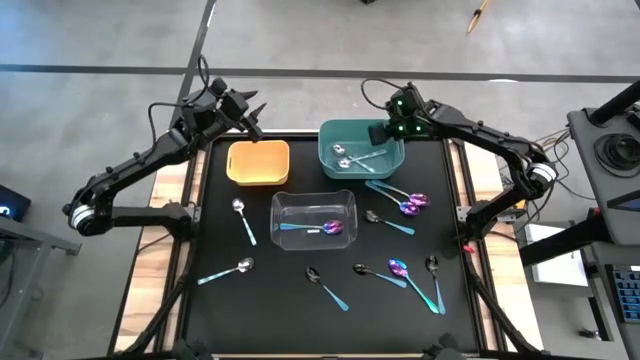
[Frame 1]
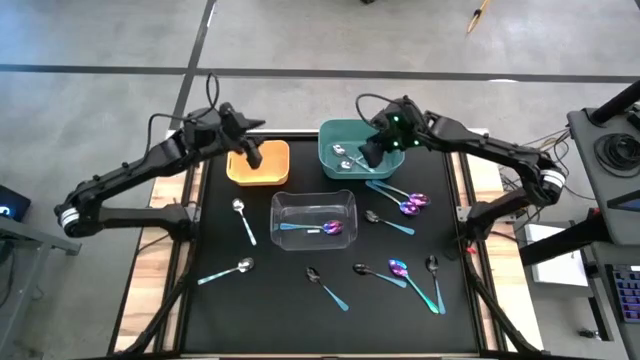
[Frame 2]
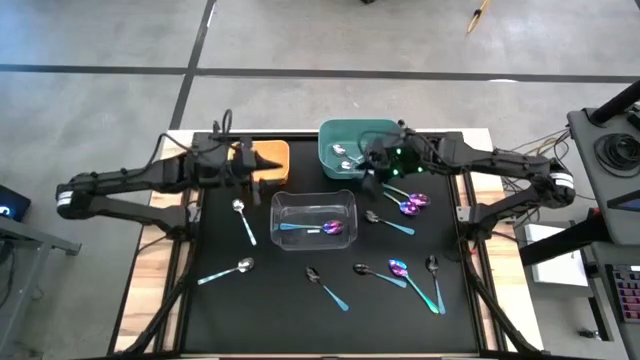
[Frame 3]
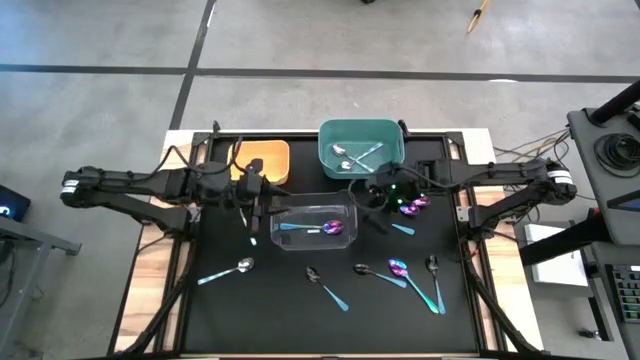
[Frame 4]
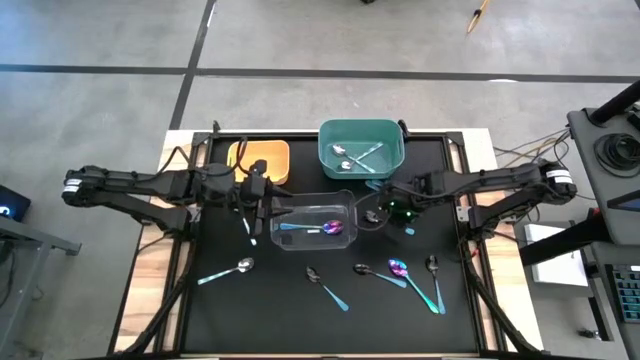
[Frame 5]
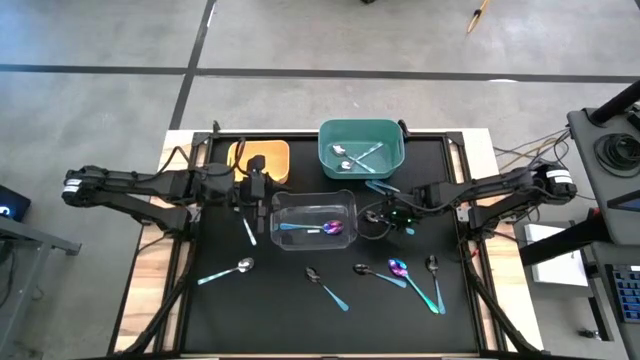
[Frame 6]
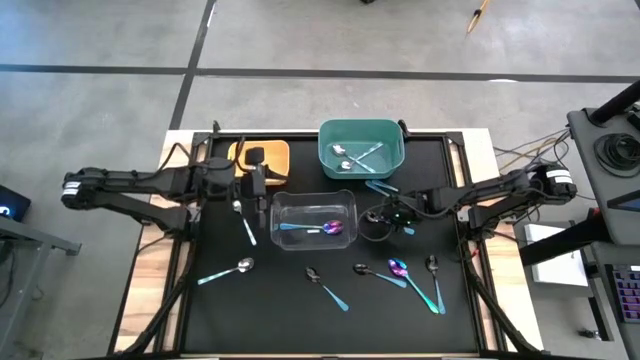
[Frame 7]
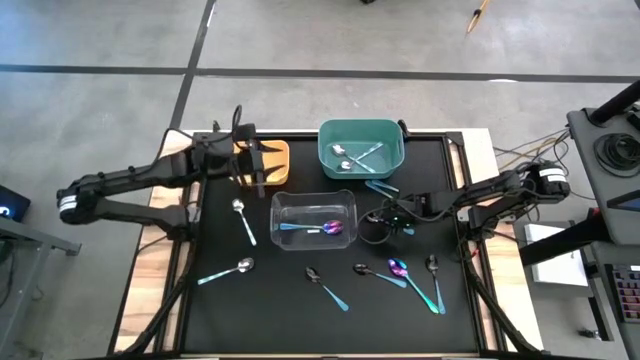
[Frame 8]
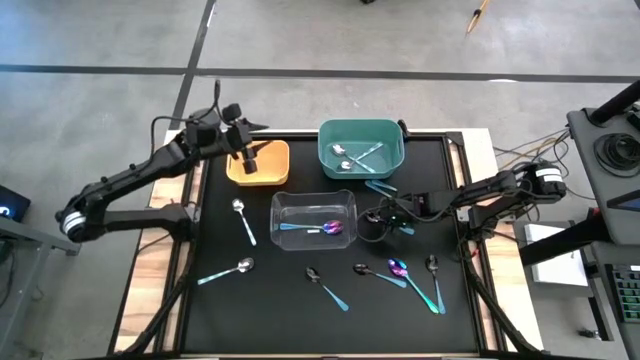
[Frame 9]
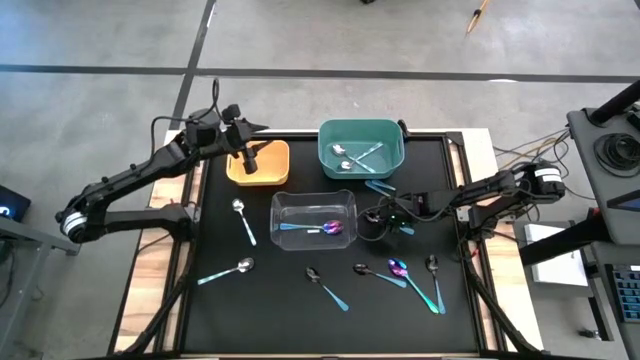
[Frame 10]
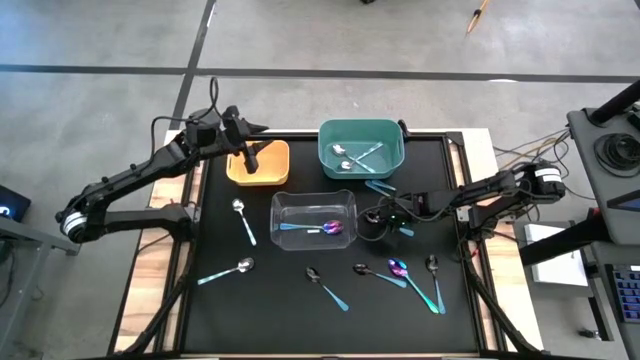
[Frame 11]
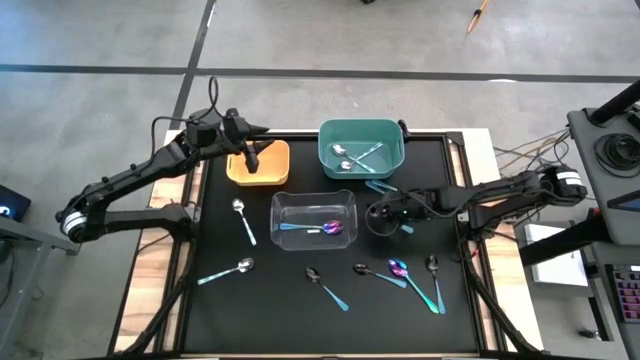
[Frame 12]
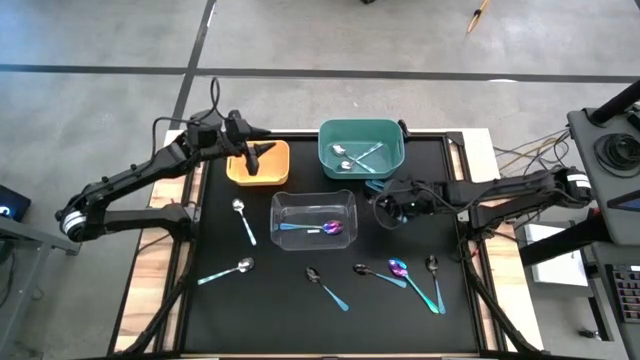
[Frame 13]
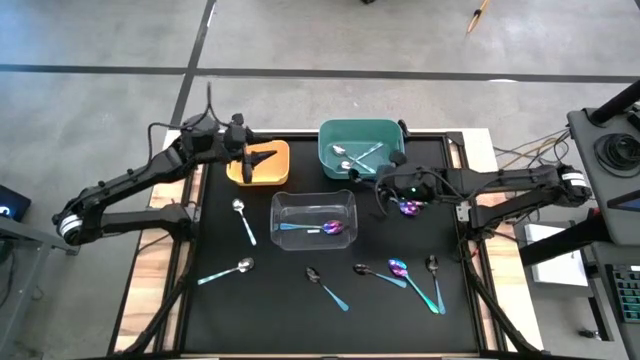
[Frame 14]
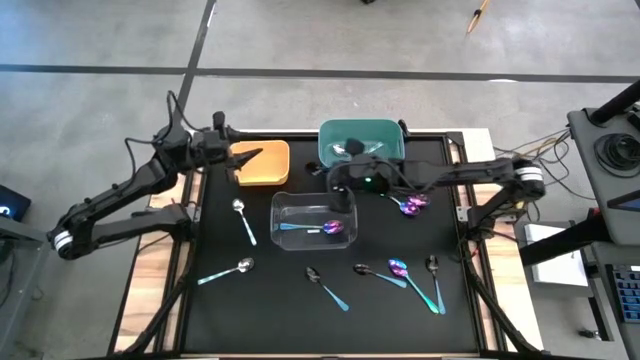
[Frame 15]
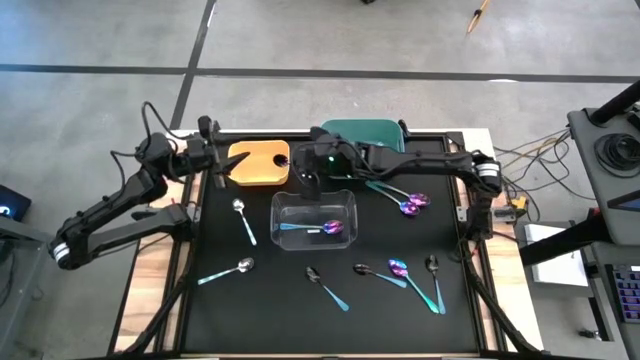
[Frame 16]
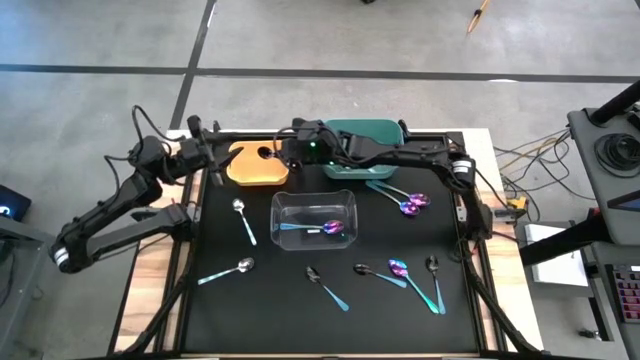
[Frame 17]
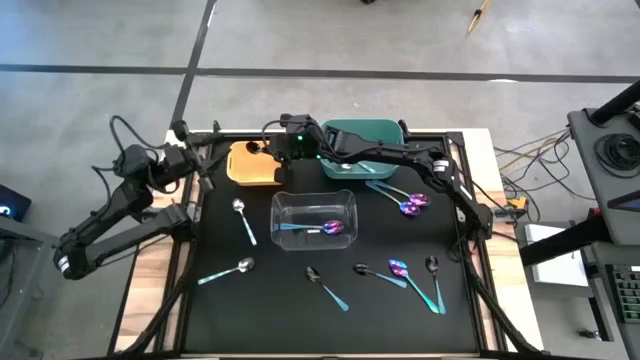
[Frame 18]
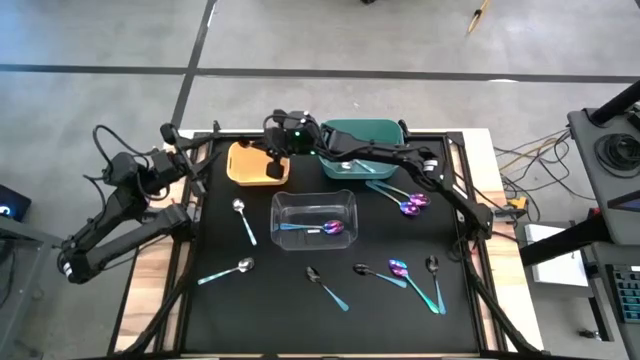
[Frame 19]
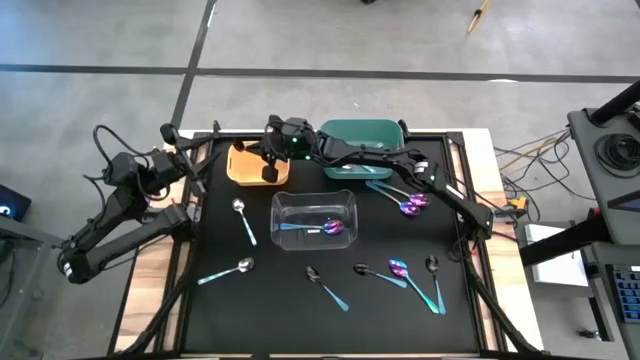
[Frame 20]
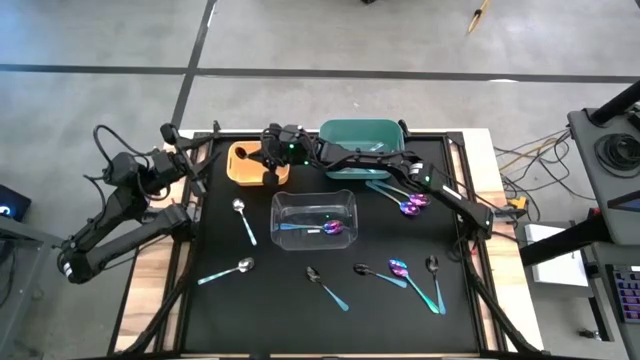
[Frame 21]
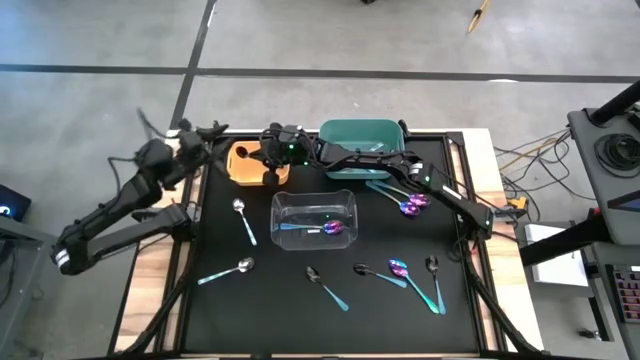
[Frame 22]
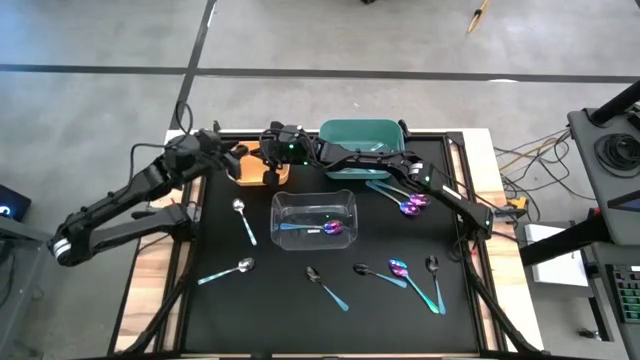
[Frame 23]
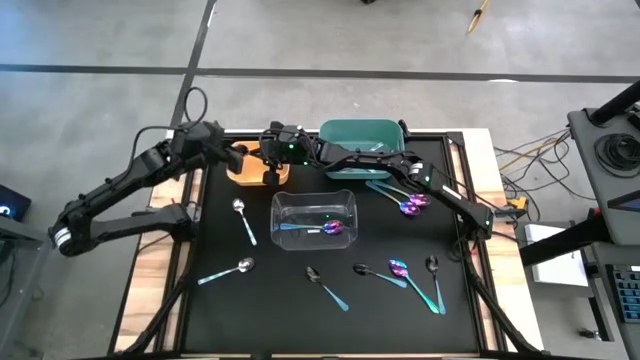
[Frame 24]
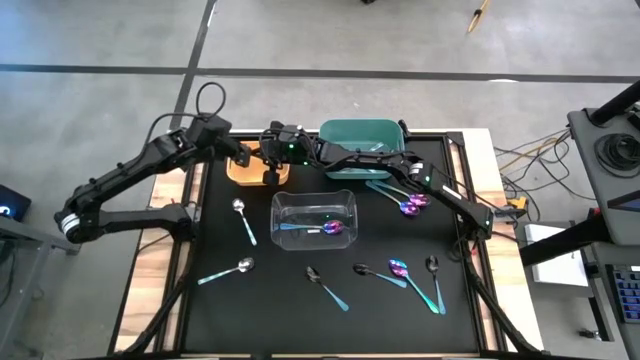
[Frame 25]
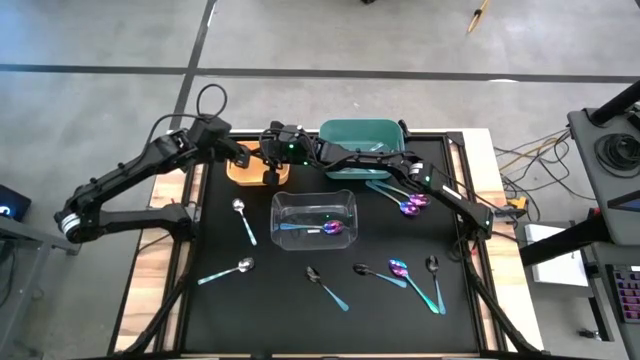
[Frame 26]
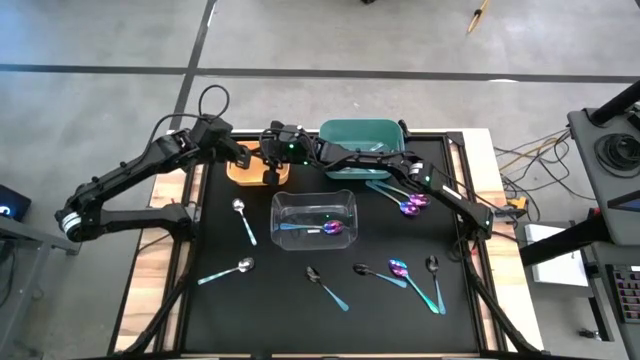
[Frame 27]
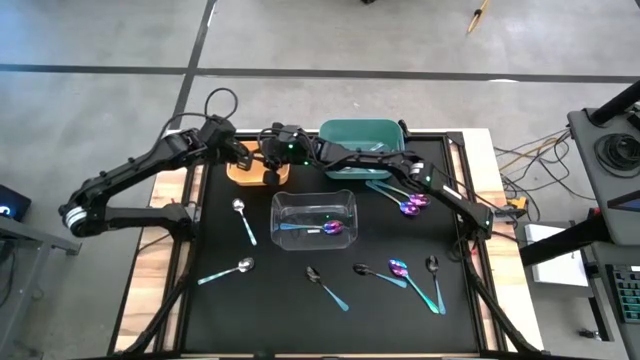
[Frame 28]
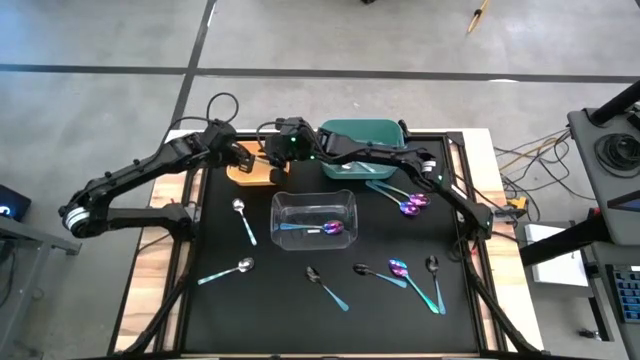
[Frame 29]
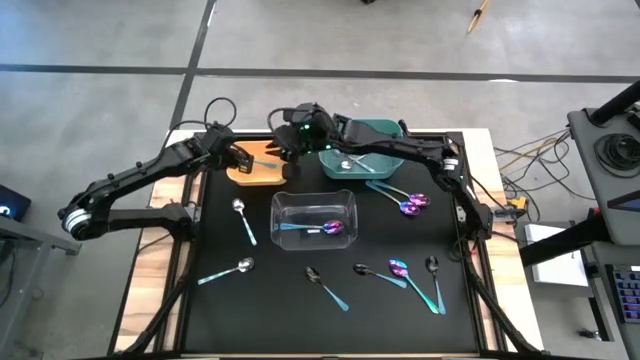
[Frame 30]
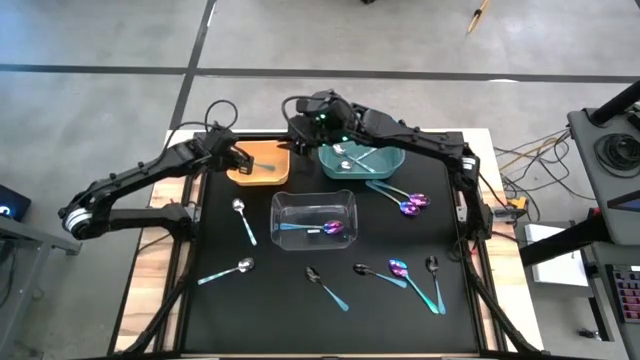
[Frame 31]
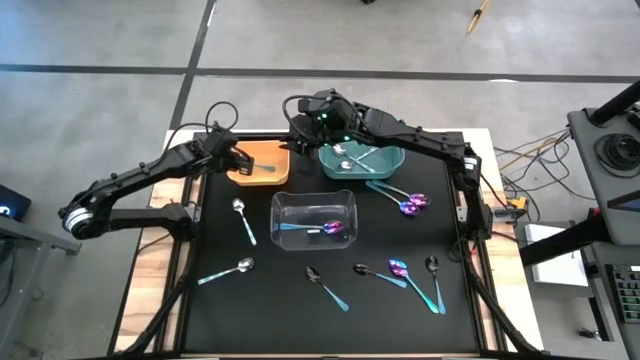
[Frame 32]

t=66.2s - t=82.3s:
Task: Sort silverware by color (type)
Put the blue spoon into the yellow bin

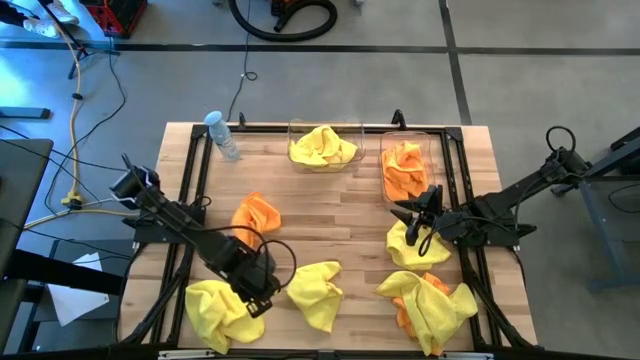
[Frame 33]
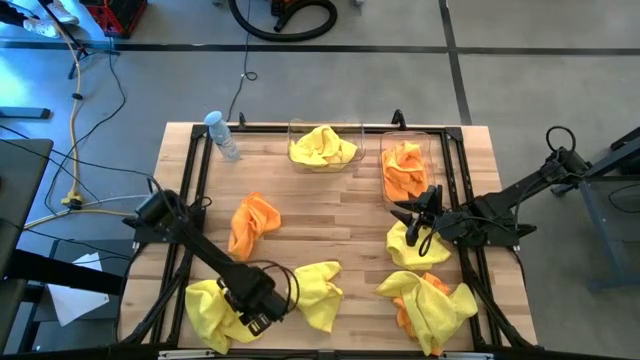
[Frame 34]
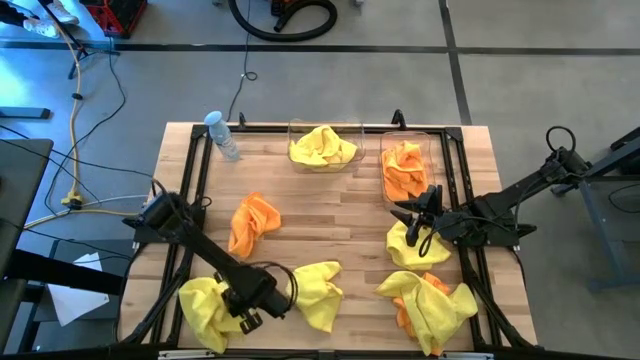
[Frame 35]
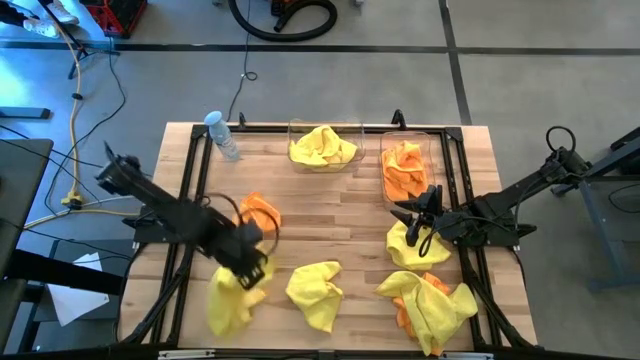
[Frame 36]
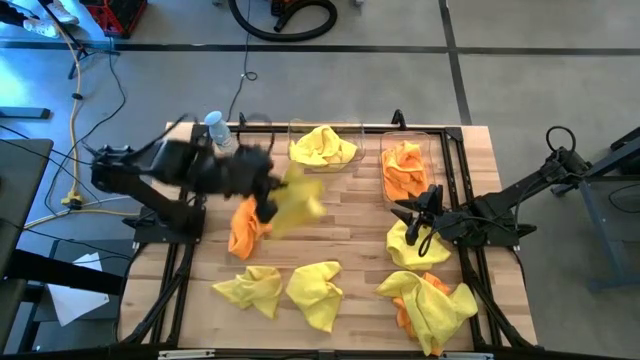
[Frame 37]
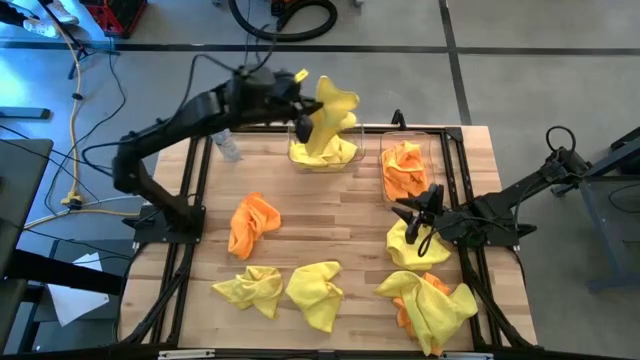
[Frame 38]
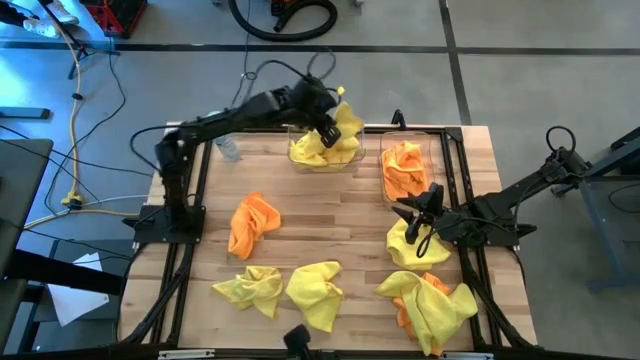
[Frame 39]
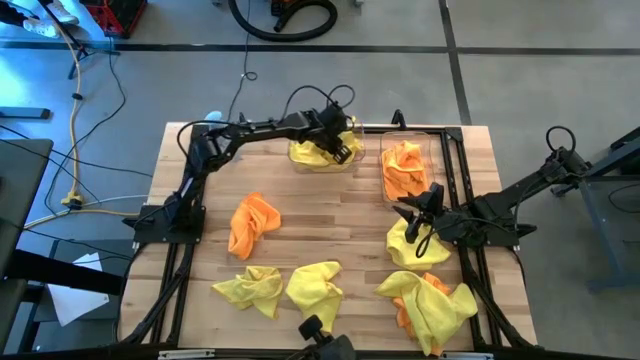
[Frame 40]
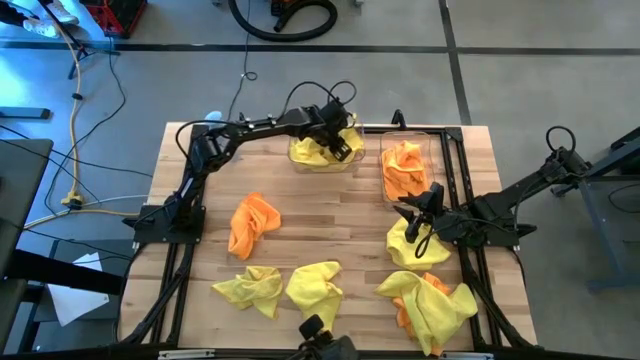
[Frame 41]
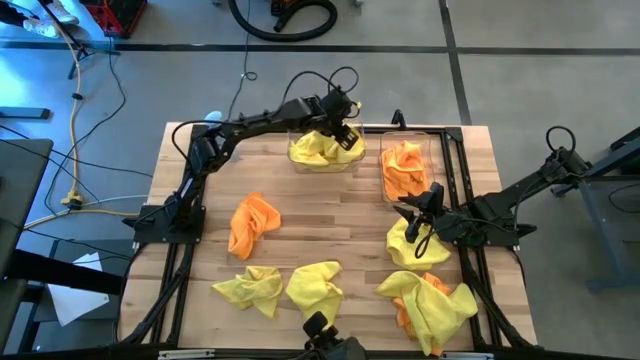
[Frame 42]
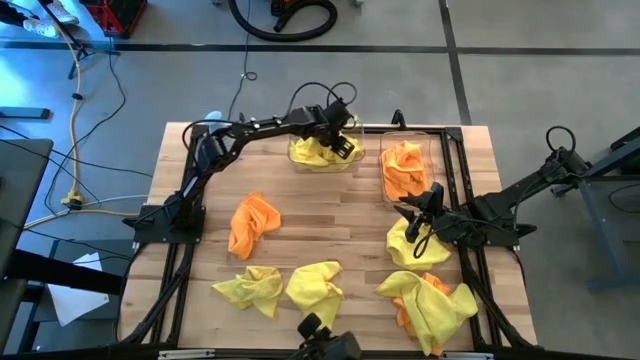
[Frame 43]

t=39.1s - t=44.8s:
Task: Sort microfiber towel by color & place in baskets
Put the yellow microfiber towel into the left transparent bin
